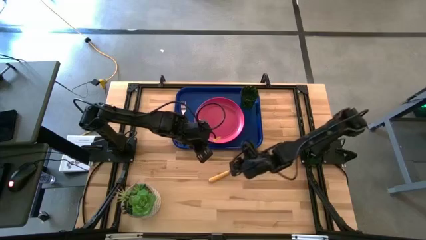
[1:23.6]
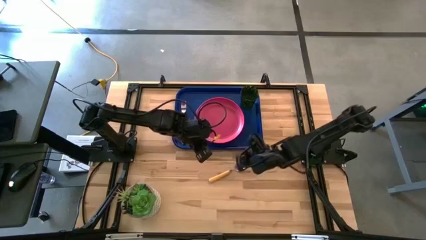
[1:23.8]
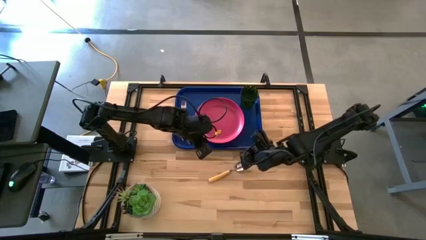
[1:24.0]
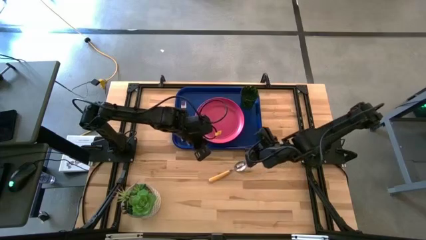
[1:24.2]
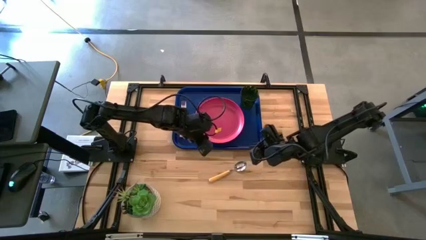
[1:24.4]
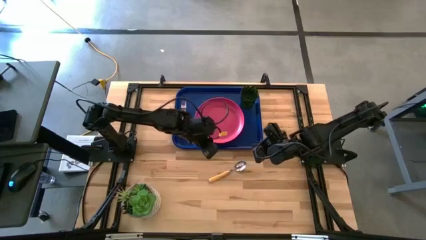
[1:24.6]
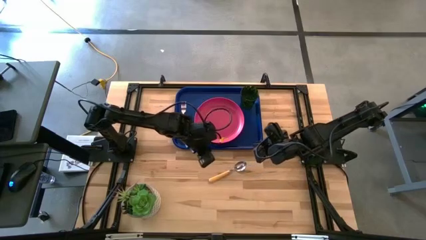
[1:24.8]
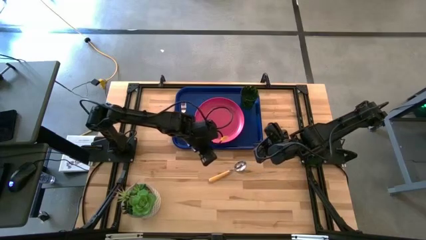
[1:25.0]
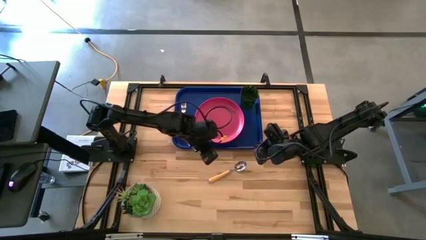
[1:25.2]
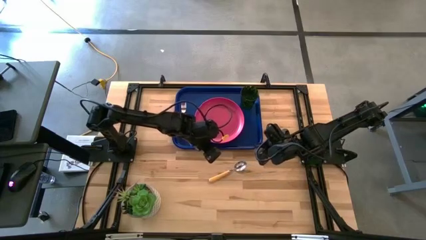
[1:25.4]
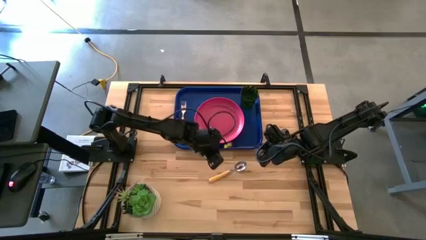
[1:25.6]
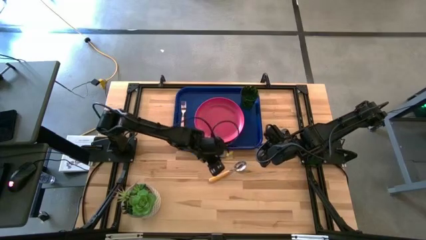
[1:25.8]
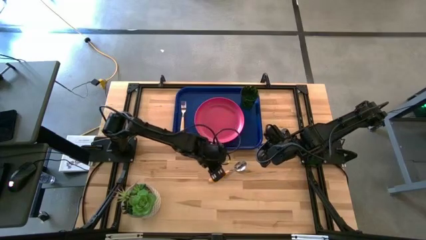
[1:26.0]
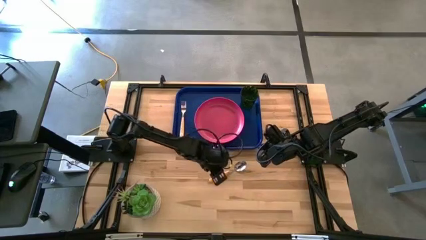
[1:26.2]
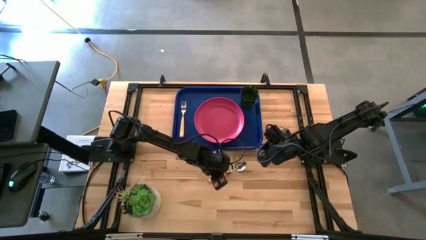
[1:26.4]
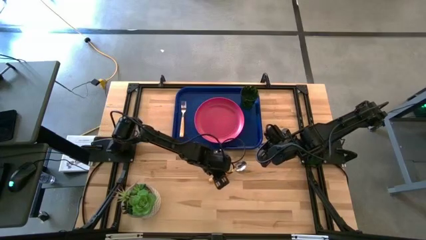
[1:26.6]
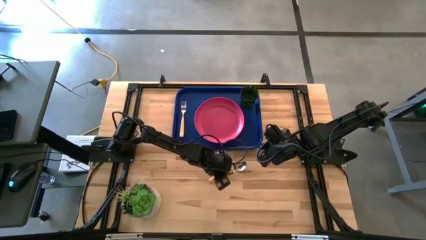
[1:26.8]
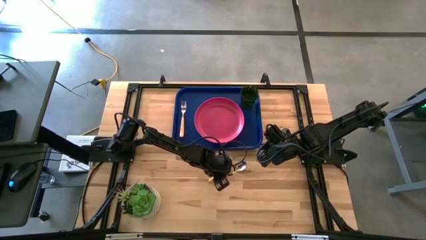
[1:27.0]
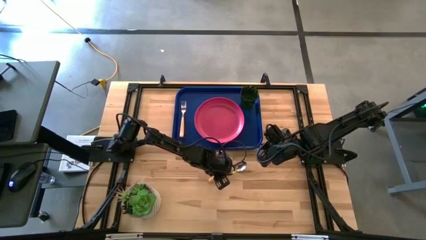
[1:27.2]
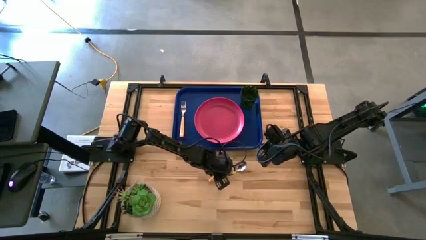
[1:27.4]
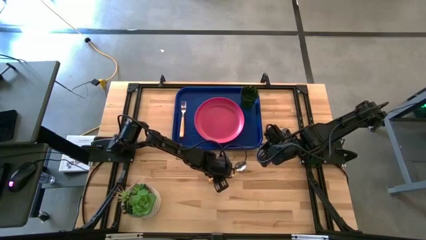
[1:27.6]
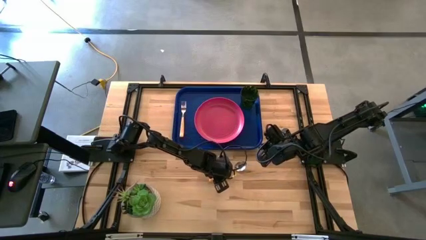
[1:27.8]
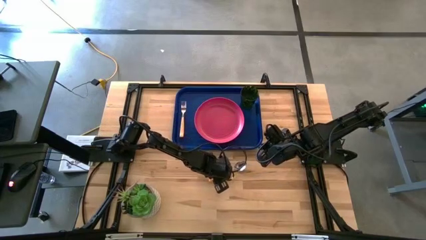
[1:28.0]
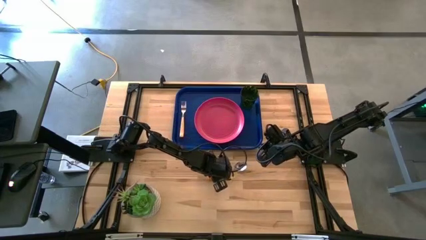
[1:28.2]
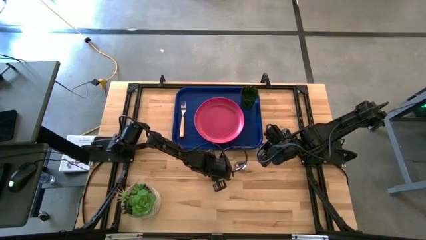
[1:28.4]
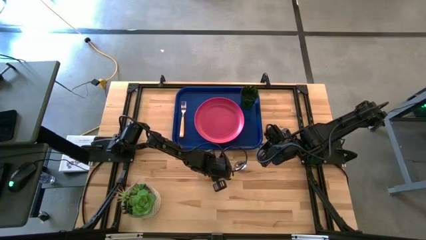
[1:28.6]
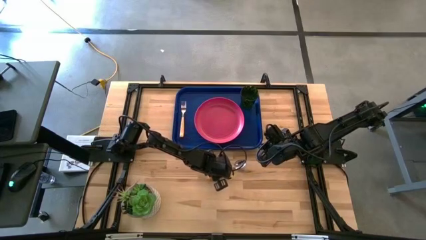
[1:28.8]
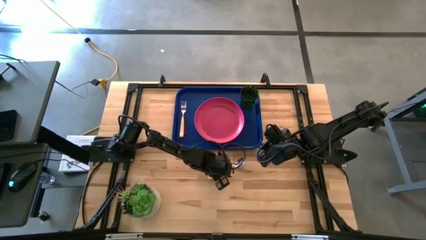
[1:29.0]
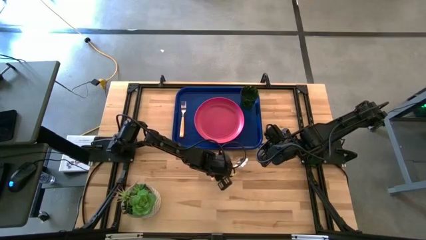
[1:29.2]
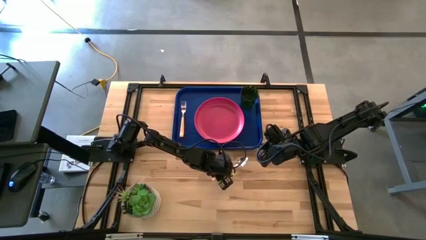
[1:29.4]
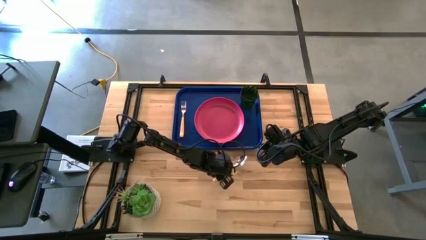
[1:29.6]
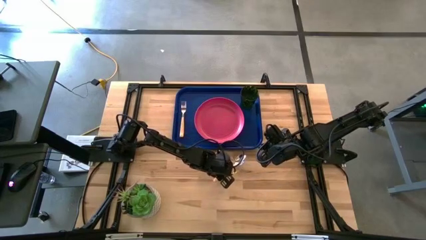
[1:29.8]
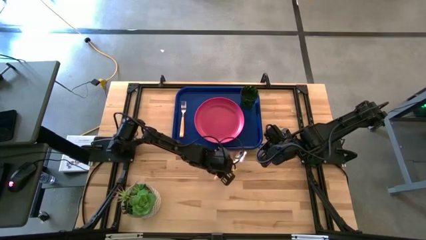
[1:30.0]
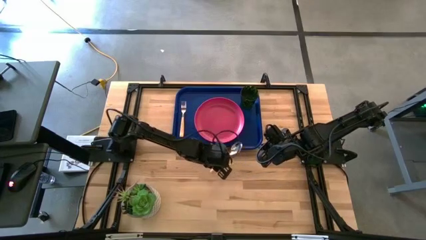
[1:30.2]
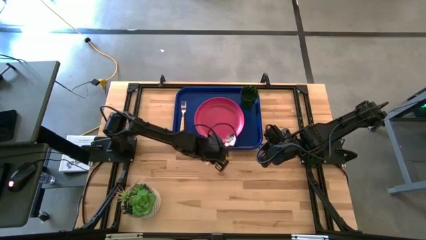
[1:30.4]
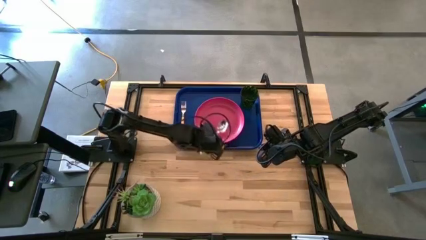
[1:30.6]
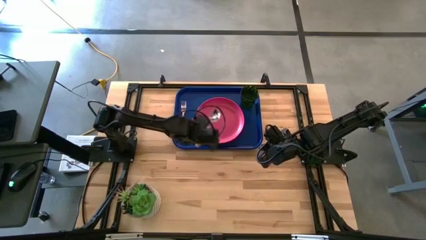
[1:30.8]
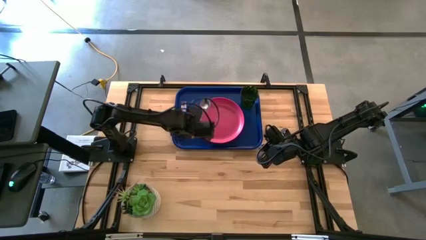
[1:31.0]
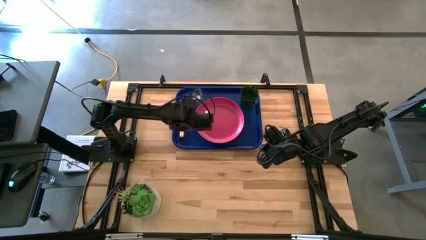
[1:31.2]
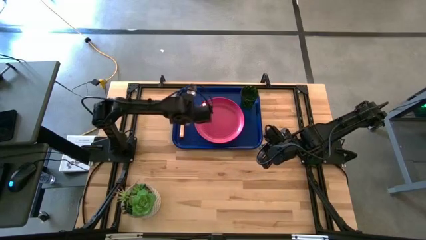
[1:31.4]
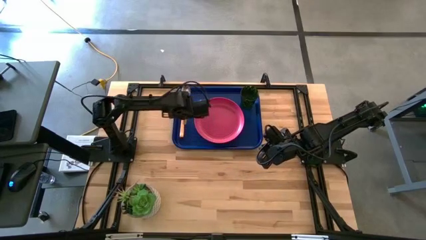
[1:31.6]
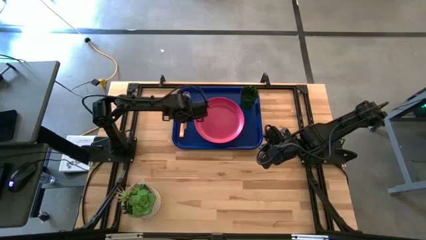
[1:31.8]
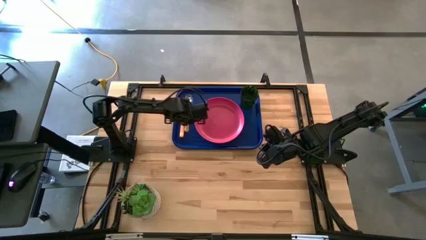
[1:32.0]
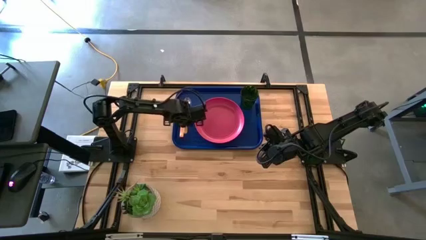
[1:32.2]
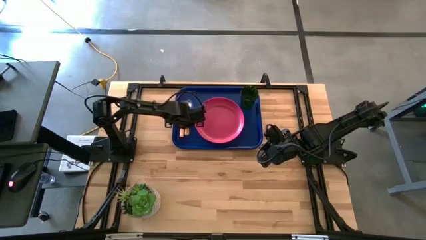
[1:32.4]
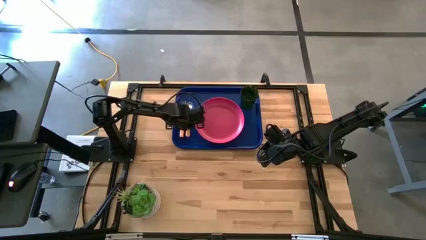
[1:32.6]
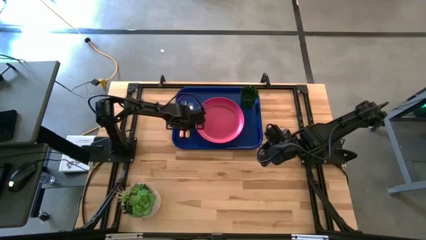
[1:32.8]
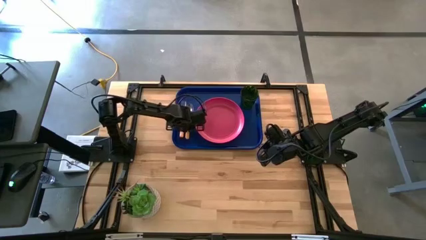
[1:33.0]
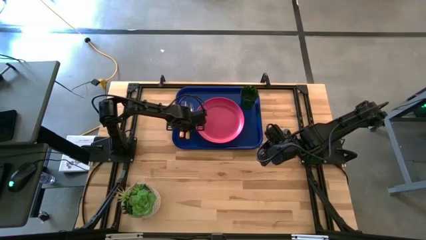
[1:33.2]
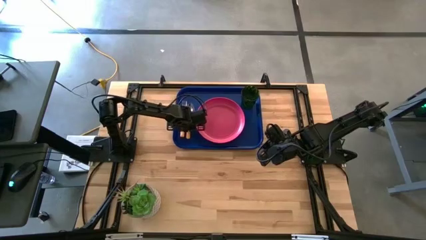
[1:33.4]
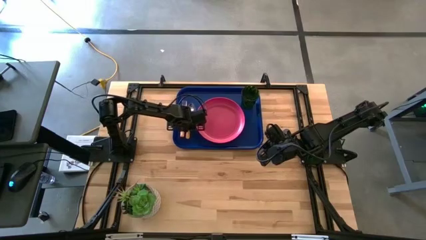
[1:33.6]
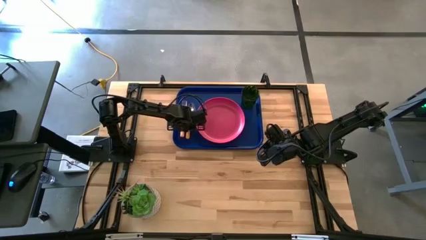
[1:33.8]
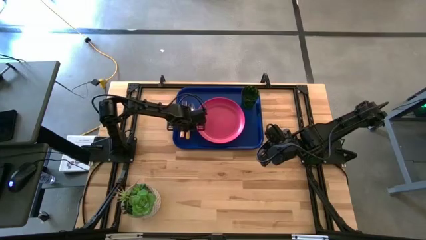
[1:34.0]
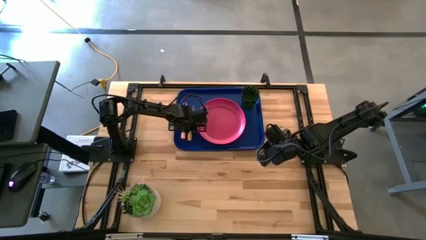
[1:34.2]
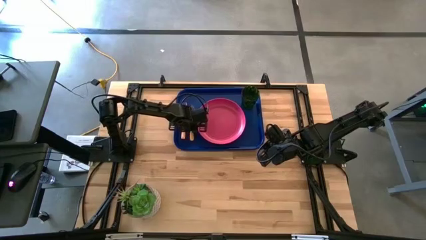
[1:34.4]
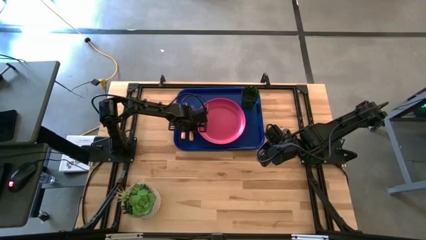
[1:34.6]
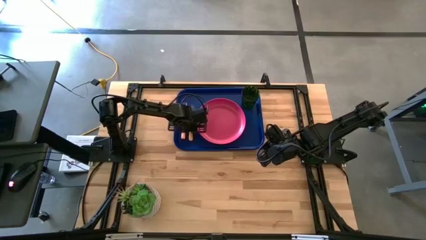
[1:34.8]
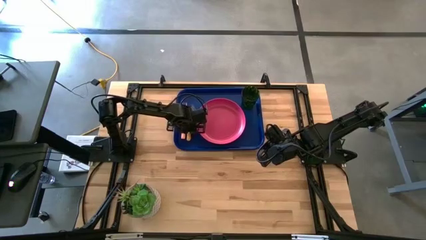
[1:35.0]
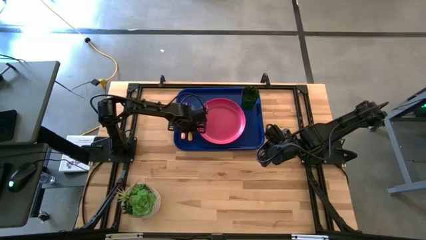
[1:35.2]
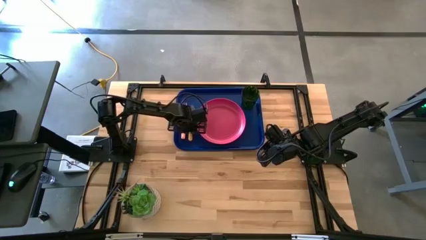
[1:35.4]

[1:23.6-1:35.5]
Task: Pick and place plate/cup/fork/spoon on tray
Put the yellow spoon between the fork and plate on the blue serving tray

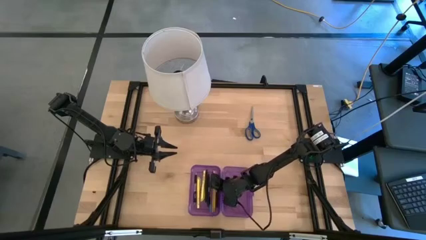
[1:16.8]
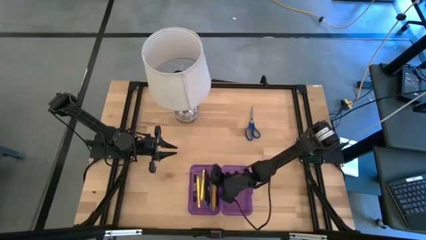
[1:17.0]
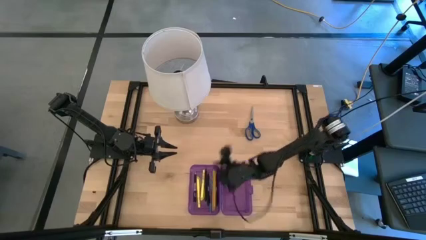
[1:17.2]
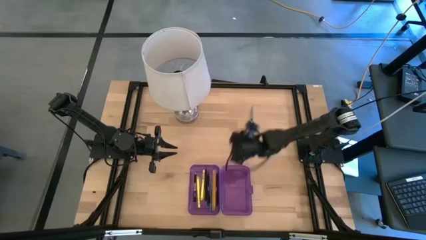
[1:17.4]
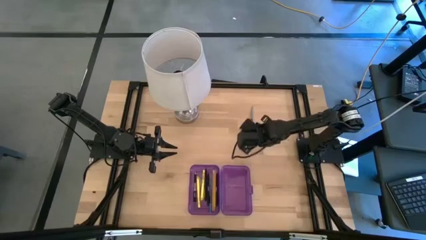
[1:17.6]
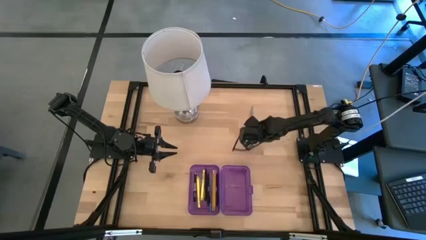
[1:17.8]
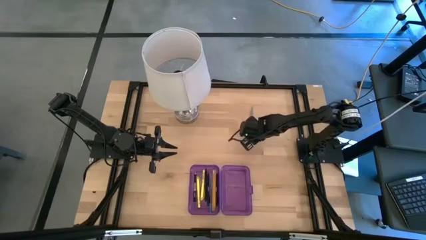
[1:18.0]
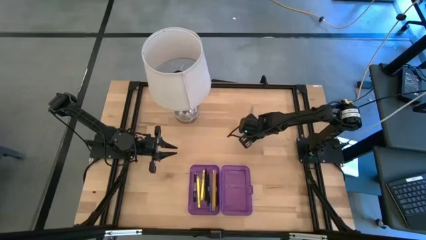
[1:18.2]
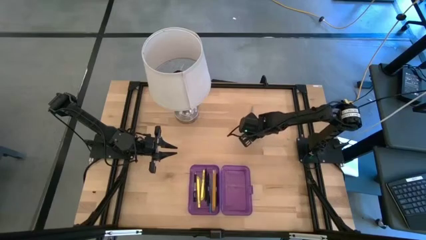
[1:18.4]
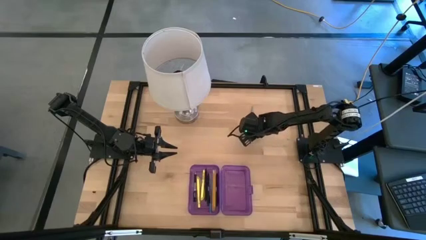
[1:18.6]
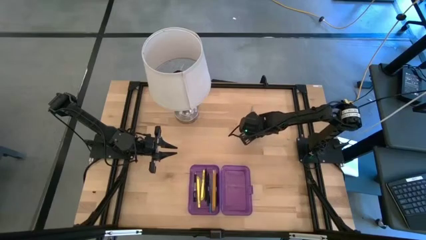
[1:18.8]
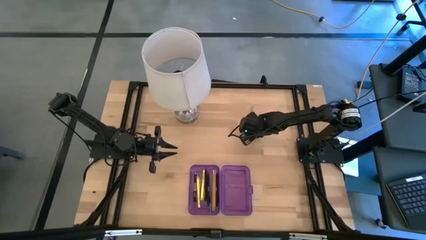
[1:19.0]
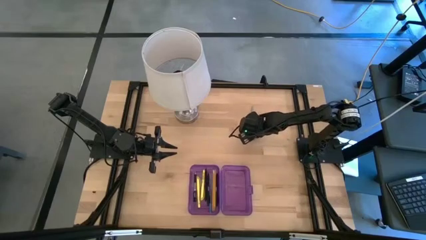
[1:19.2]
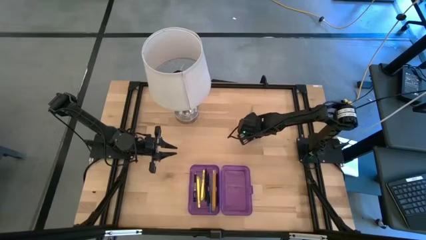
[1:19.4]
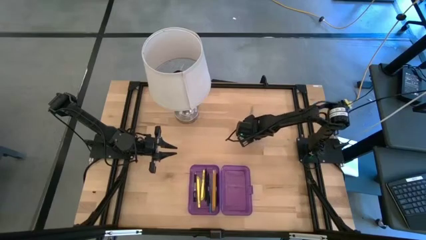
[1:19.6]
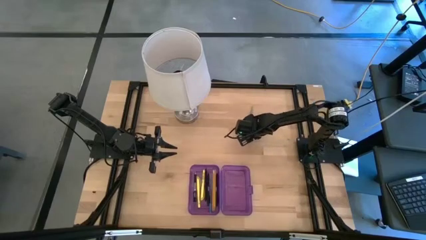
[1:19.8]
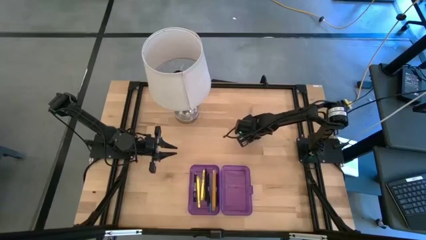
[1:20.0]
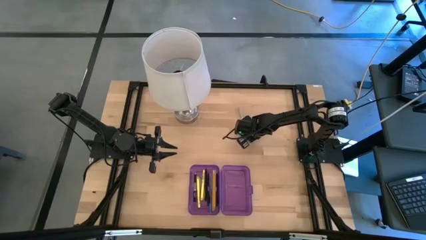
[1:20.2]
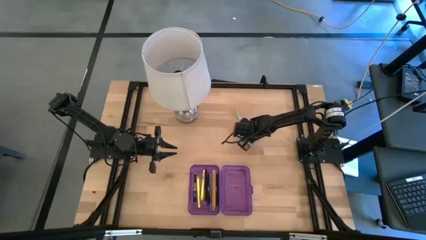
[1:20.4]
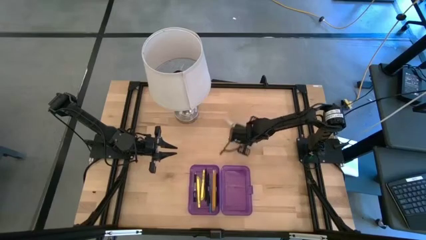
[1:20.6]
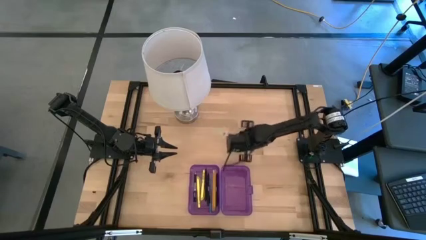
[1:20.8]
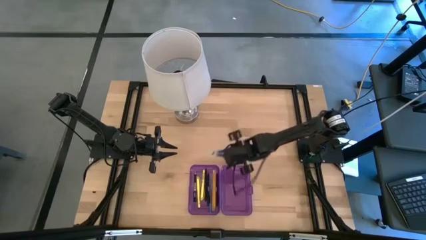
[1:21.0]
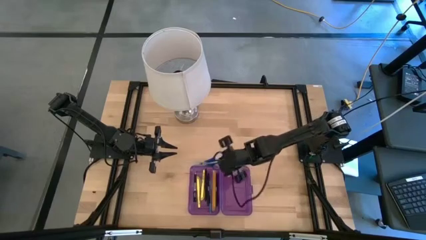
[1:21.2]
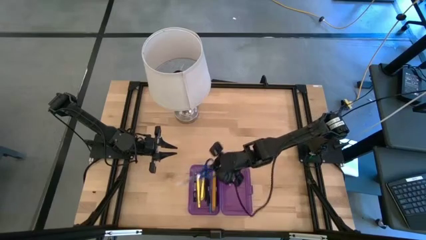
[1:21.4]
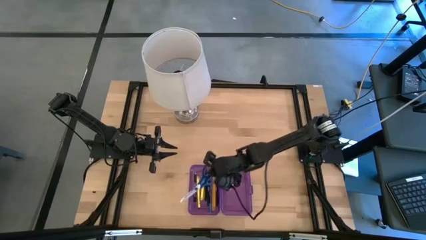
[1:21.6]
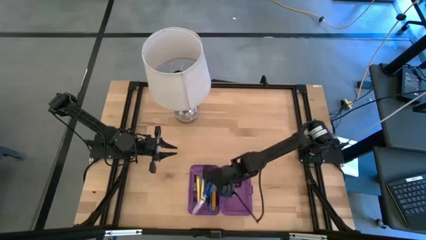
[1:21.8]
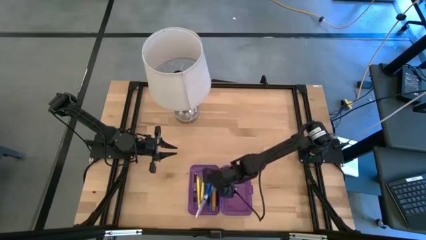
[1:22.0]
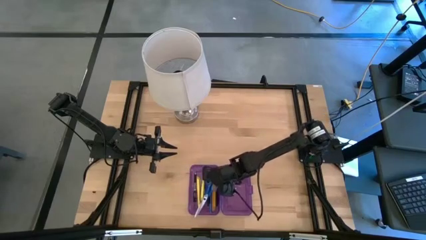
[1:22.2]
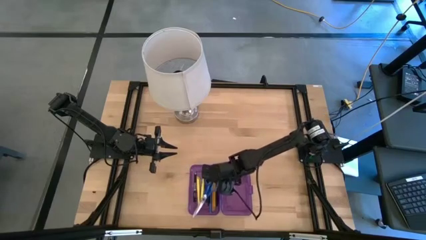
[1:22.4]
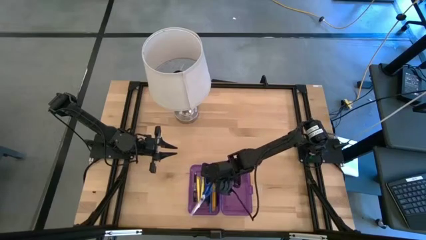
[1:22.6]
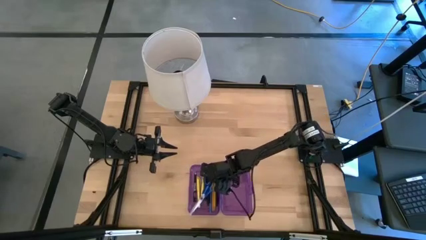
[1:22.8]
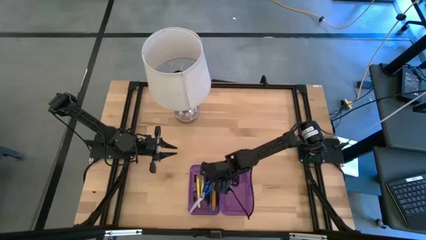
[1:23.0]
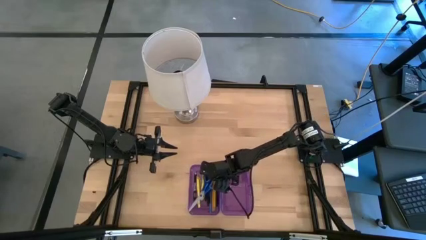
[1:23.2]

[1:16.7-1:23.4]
Task: Pick & place school supplies into a supply box
Put the blue scissors into the violet supply box
